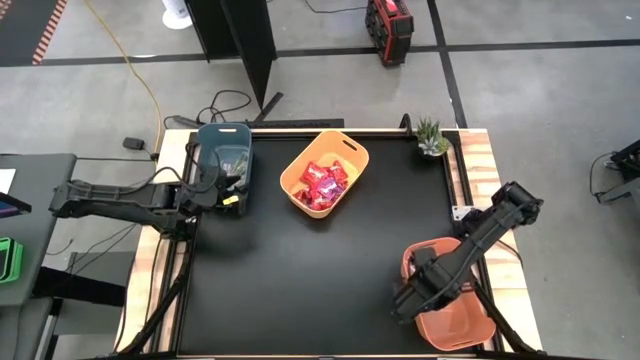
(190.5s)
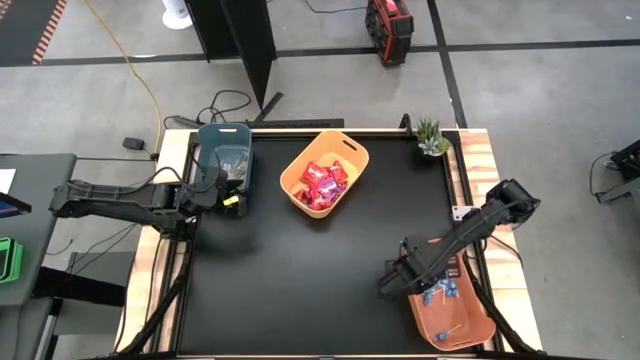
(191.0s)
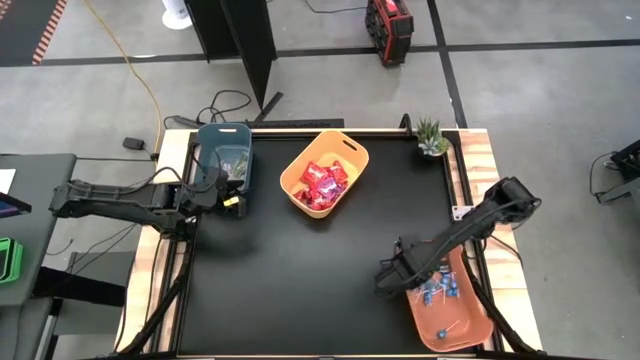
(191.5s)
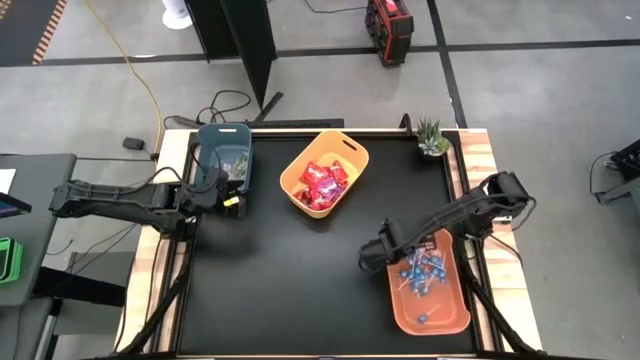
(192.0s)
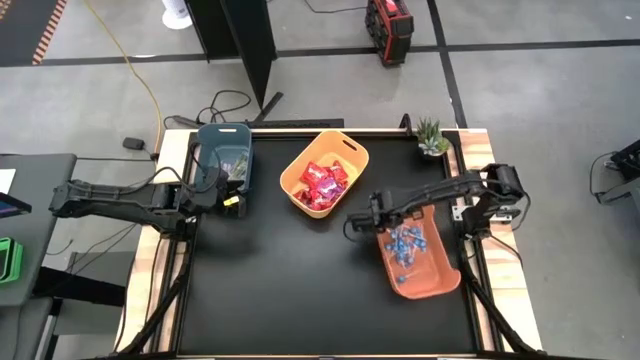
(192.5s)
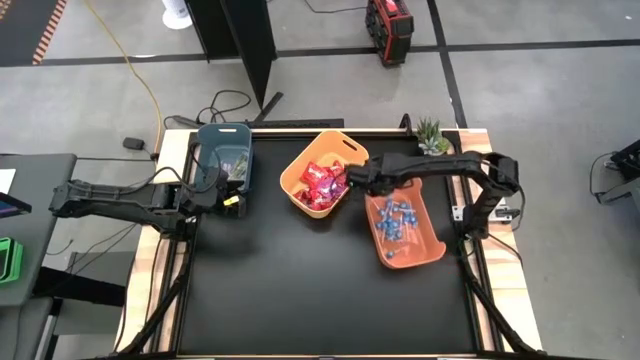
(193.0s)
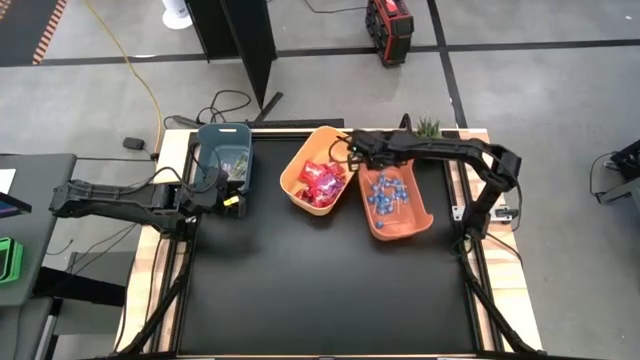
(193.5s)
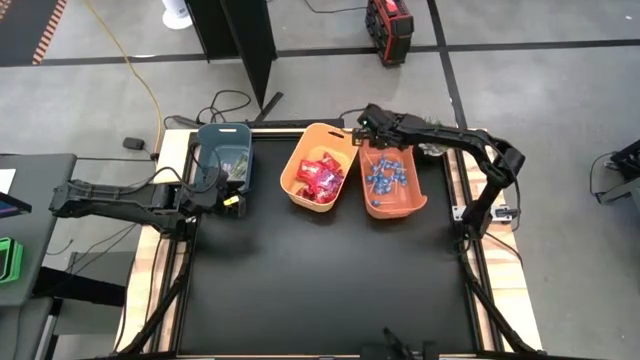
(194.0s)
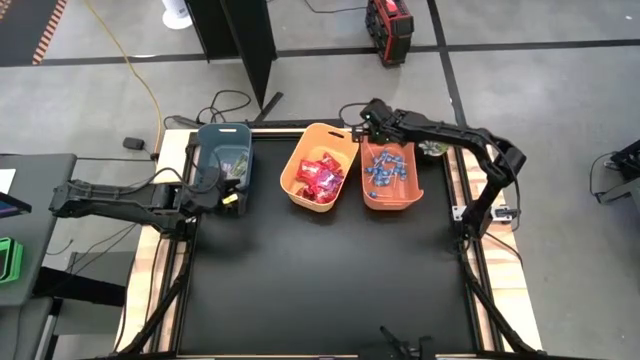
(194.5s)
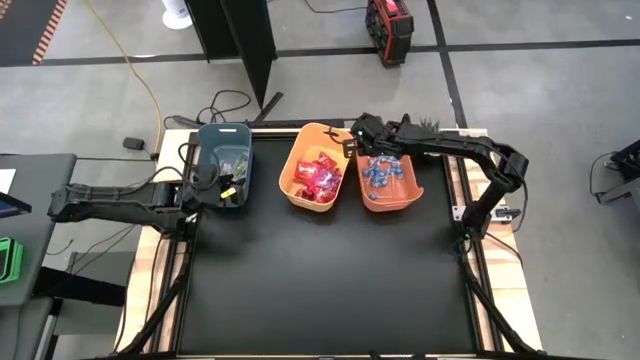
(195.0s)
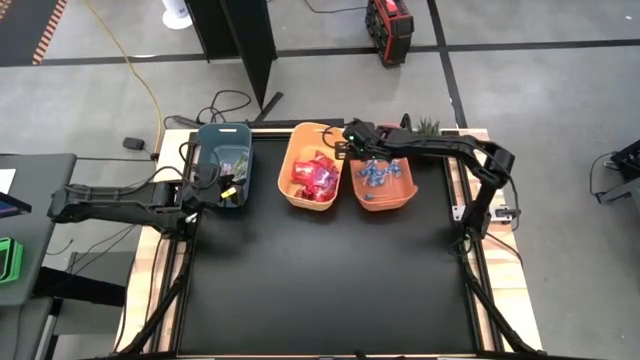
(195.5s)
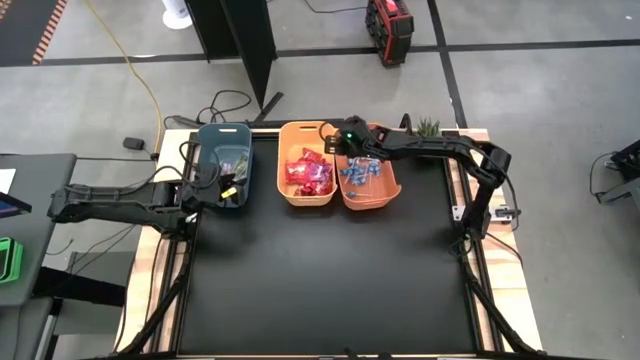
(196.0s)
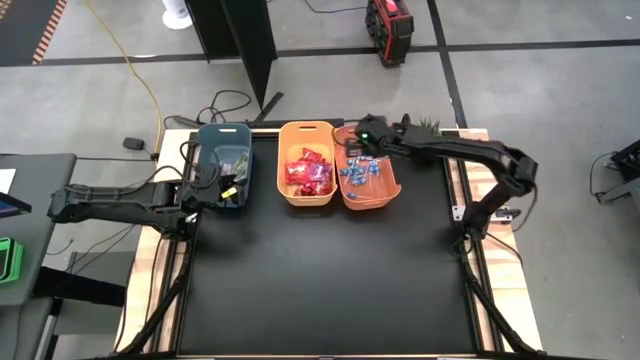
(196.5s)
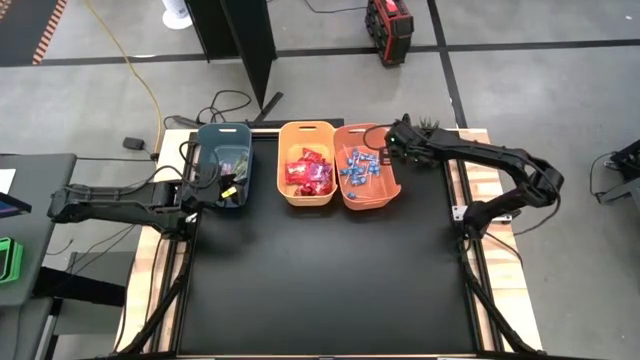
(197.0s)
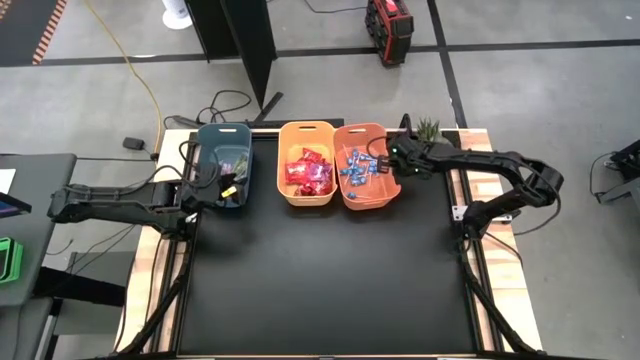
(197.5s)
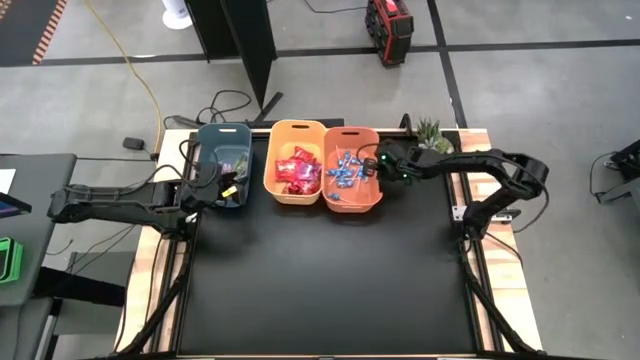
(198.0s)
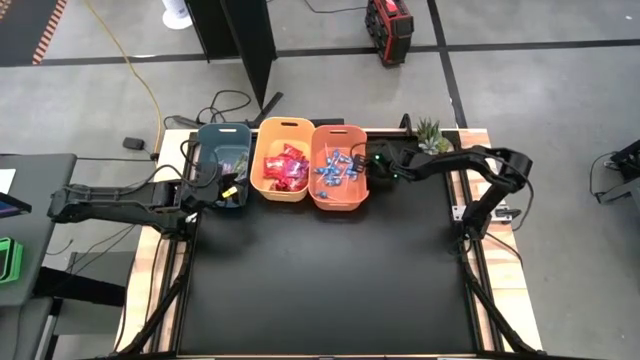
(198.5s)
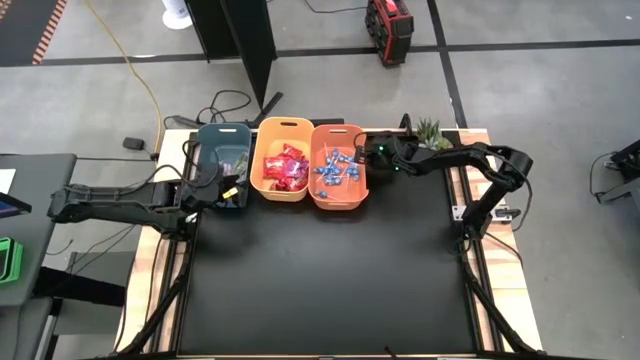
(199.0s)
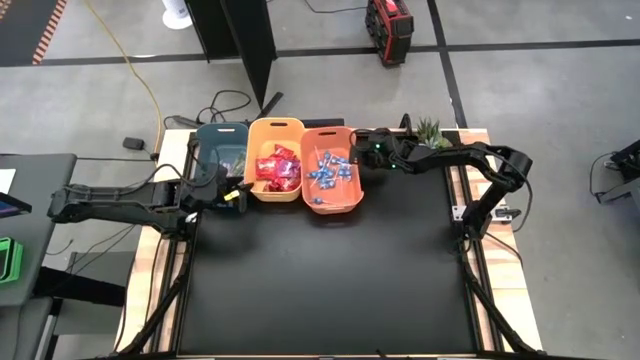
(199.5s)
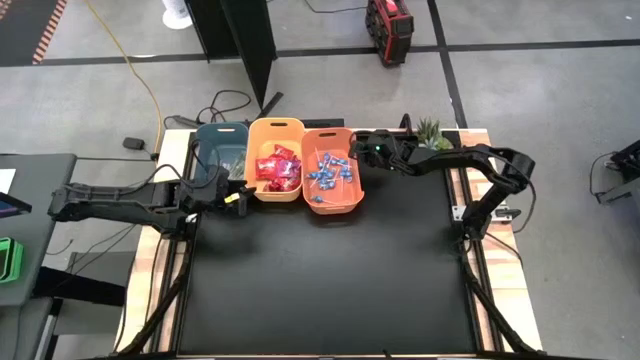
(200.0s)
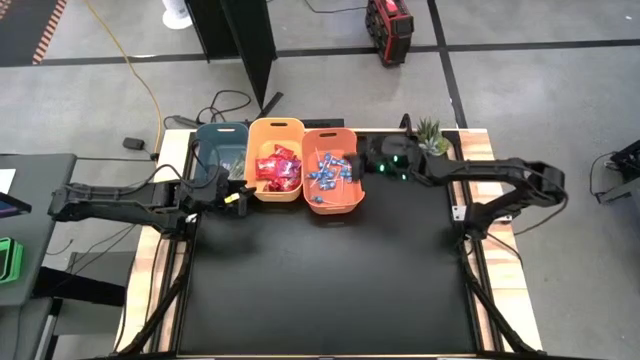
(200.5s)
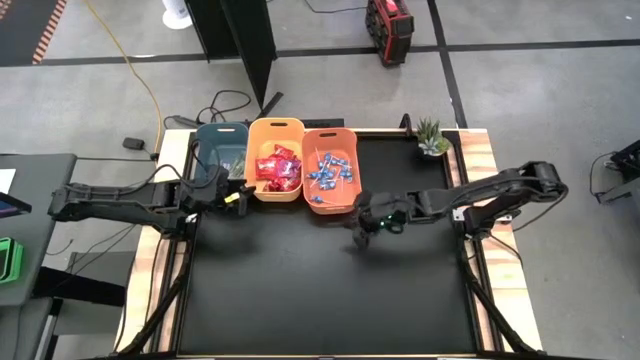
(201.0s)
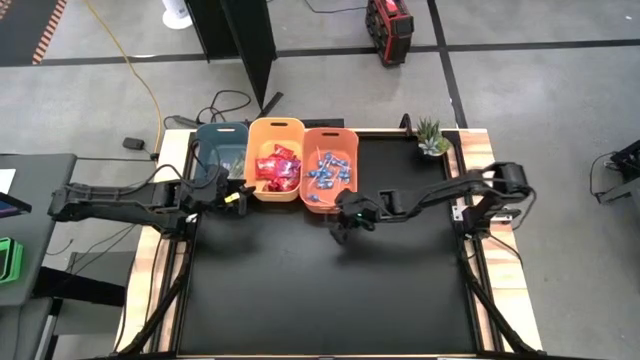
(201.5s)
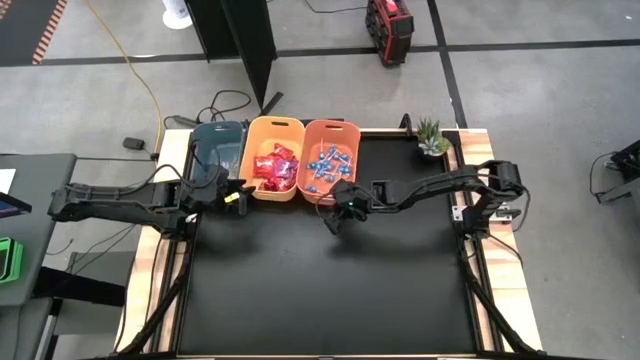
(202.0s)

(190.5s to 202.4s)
Task: Sort candy
Move the orange bin to the right side of the yellow bin

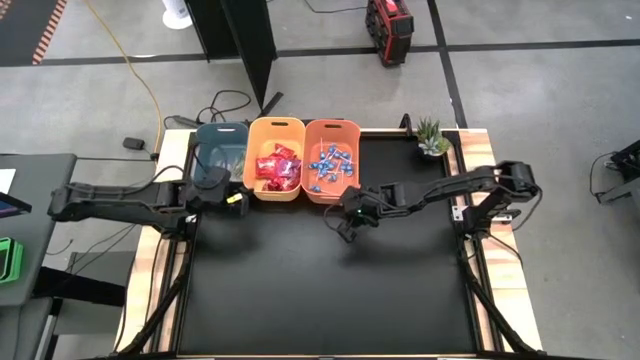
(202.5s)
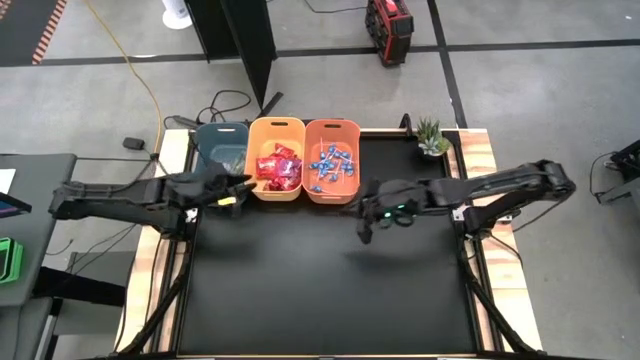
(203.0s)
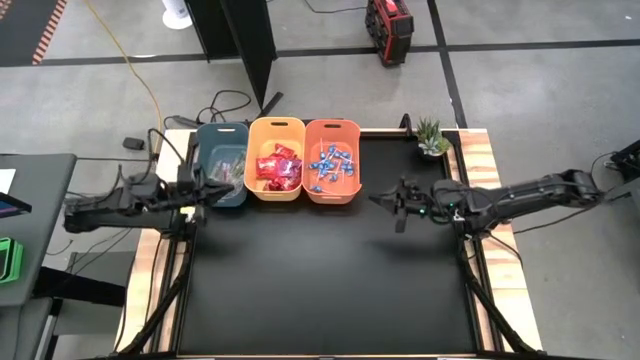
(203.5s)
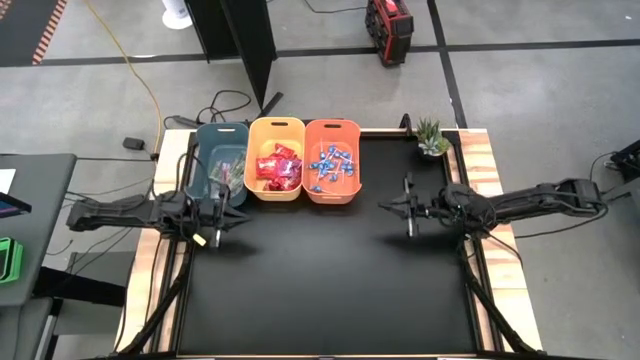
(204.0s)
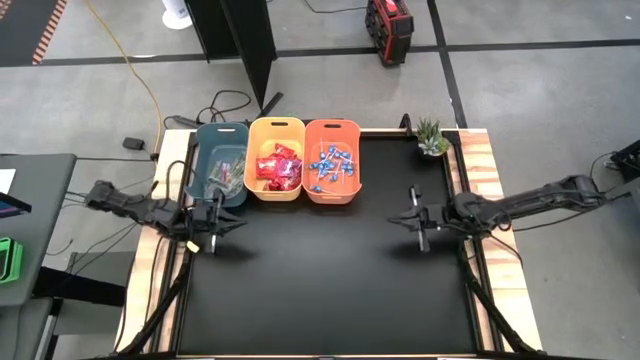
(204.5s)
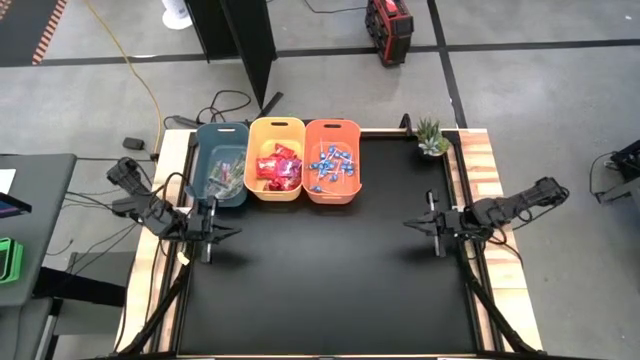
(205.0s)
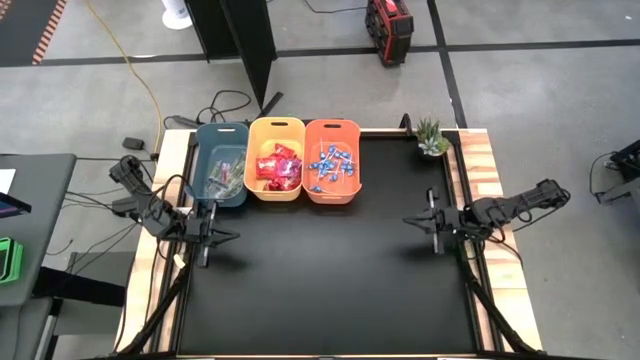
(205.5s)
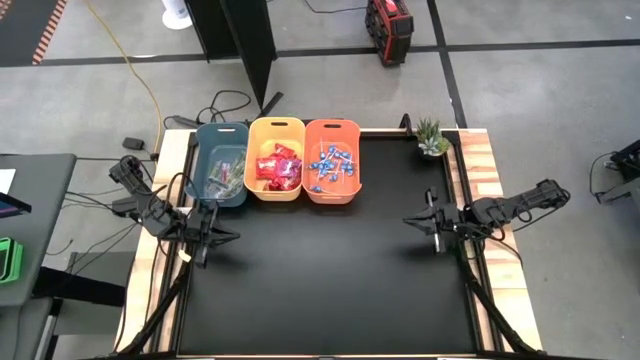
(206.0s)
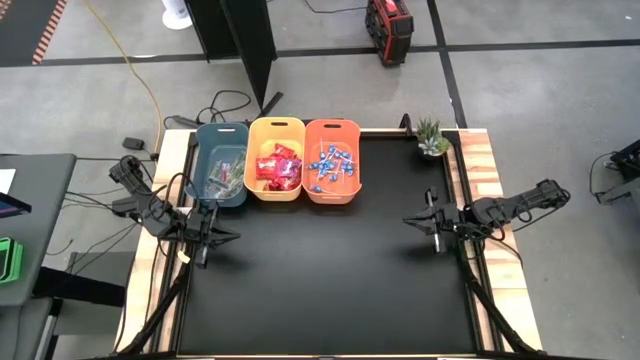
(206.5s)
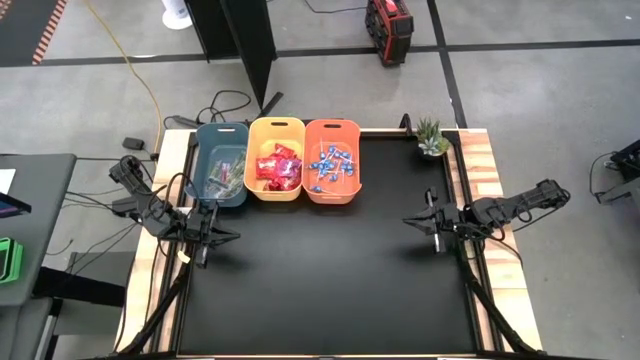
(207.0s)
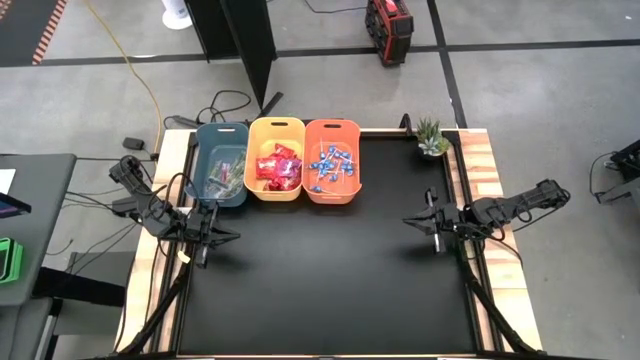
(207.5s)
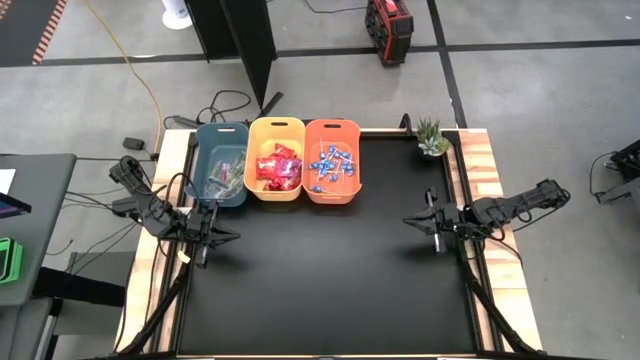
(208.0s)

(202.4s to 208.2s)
Return to Home Position

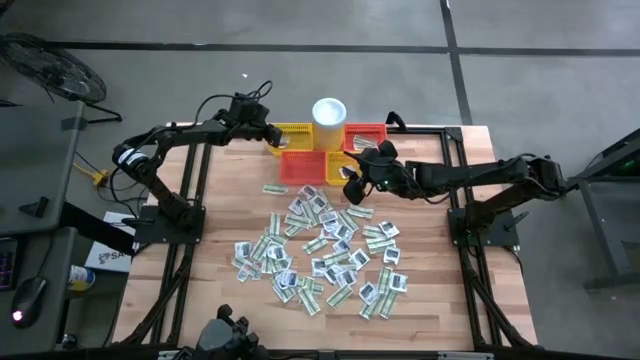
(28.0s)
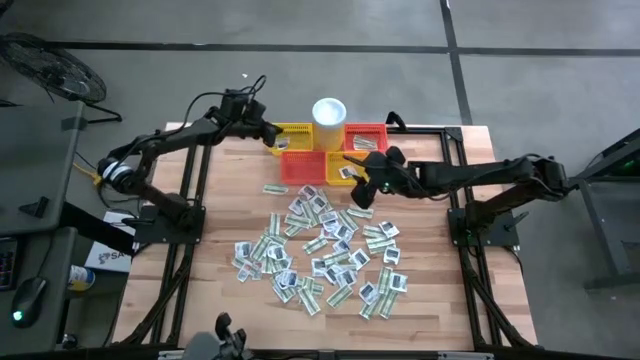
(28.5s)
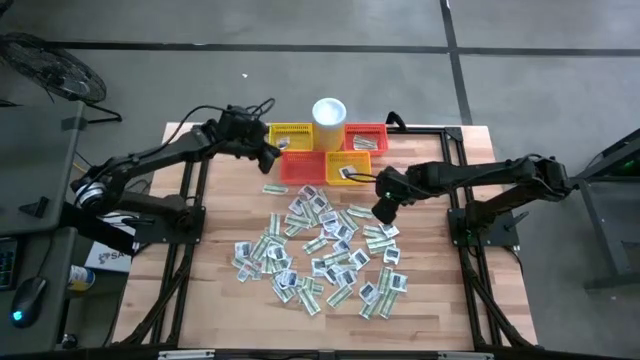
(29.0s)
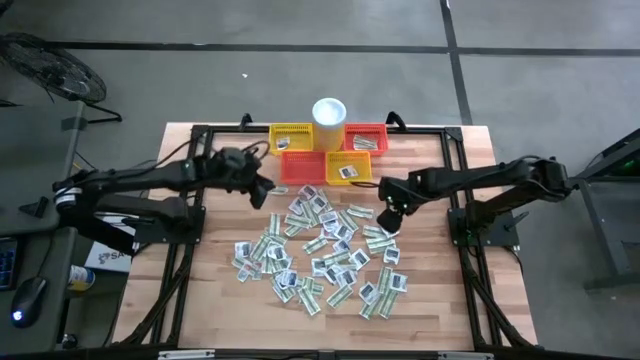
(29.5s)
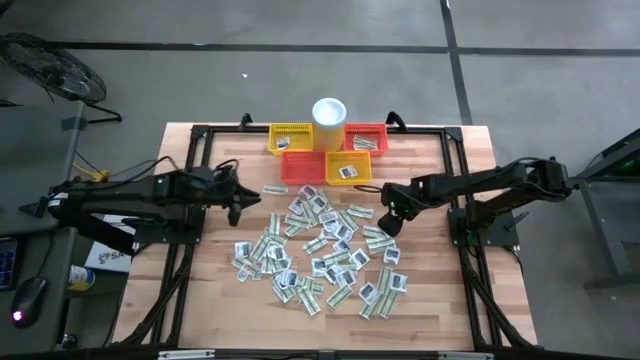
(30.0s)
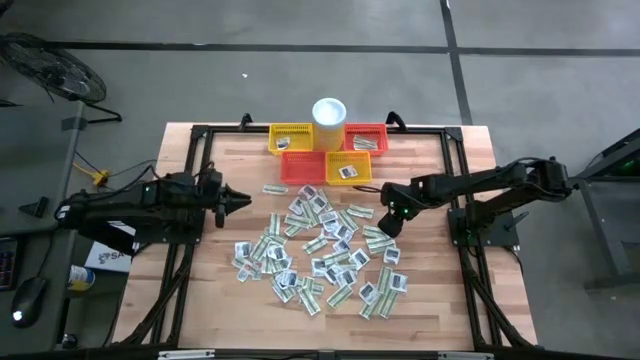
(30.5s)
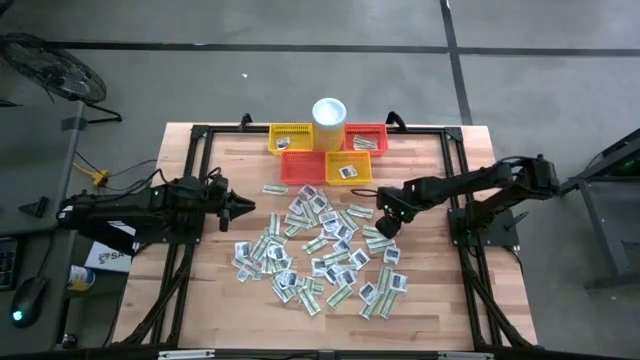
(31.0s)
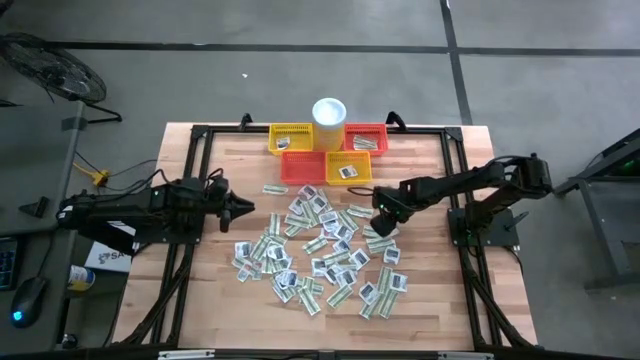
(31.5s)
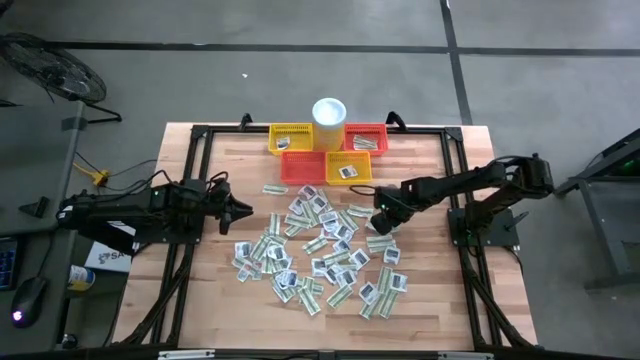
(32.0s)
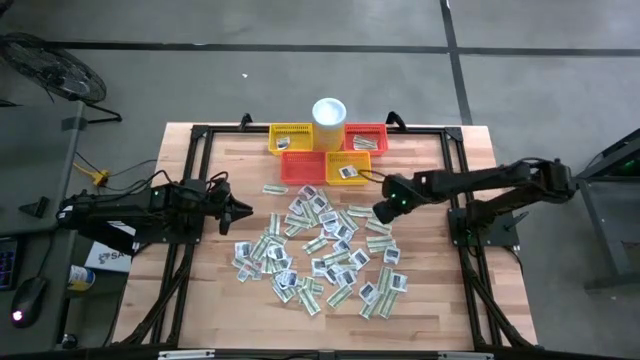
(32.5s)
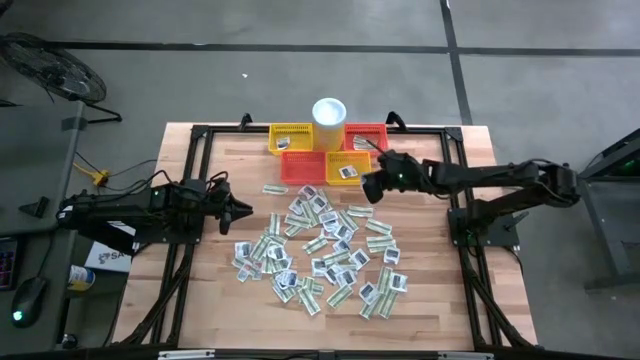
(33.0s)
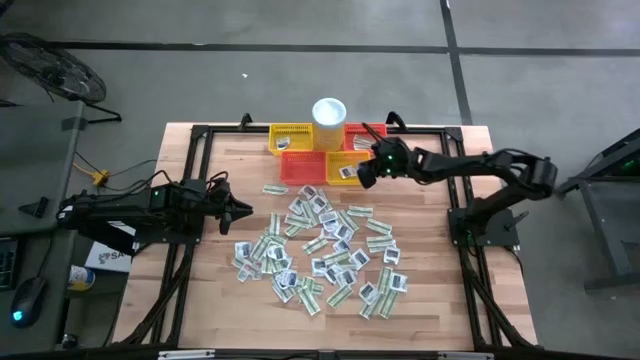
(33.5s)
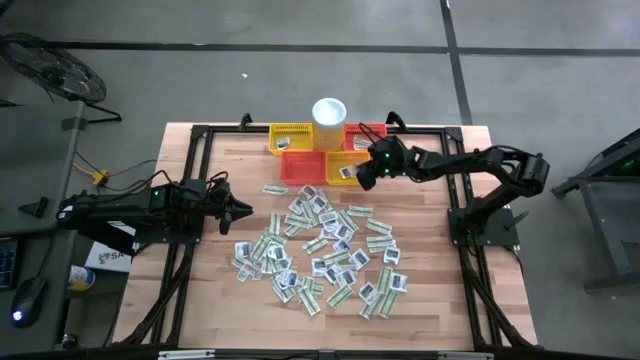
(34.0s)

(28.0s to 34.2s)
Task: Pick & Place First Aid Supplies
Put the black towelette pack into the bottom yellow basket
